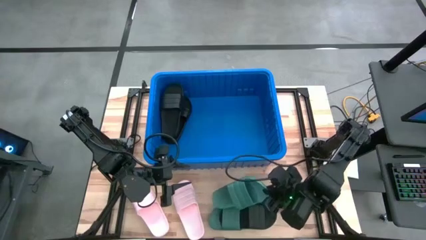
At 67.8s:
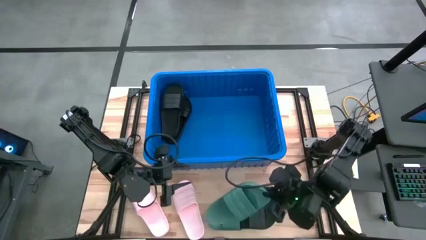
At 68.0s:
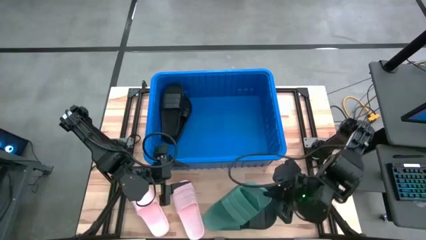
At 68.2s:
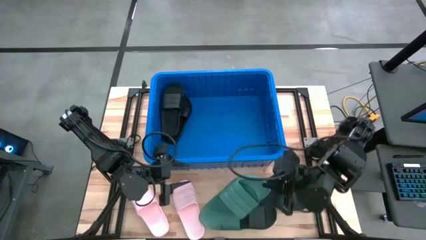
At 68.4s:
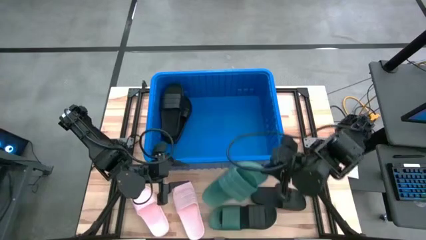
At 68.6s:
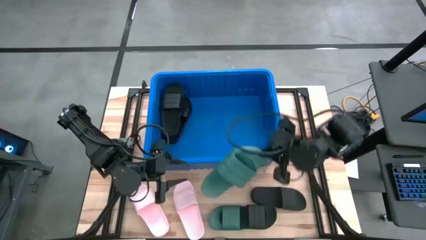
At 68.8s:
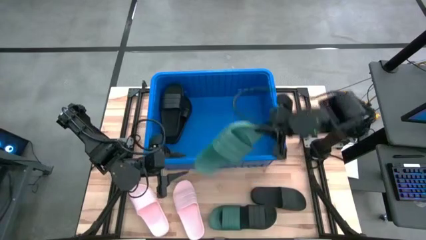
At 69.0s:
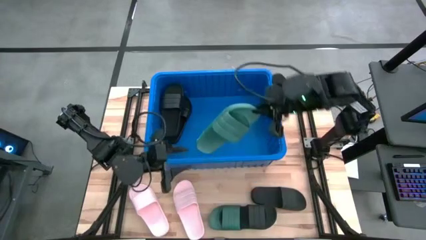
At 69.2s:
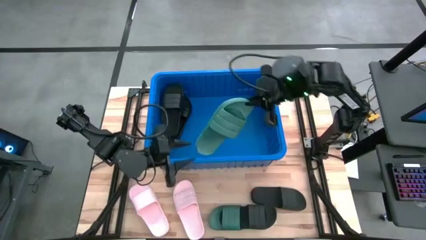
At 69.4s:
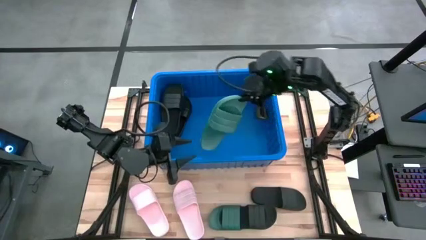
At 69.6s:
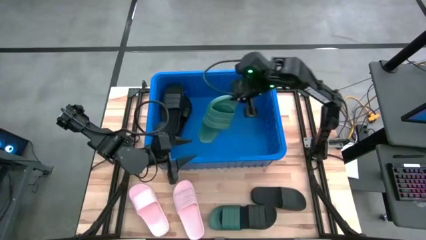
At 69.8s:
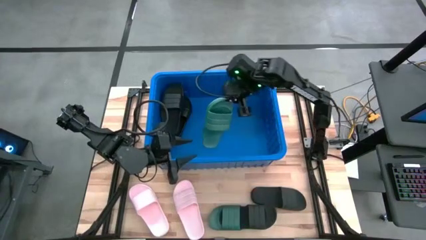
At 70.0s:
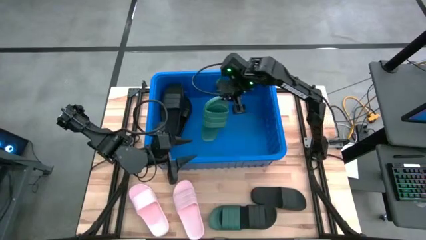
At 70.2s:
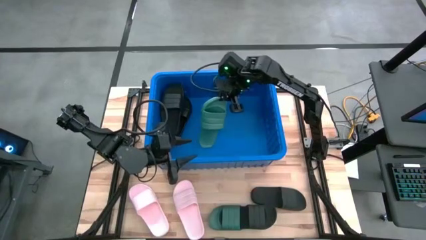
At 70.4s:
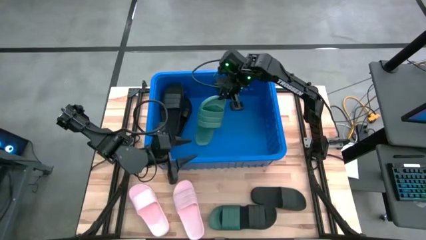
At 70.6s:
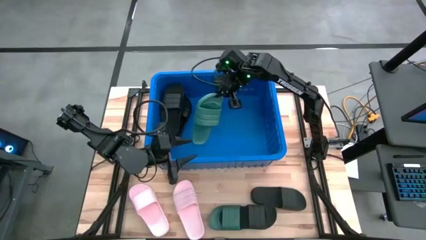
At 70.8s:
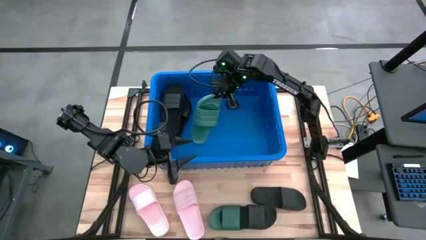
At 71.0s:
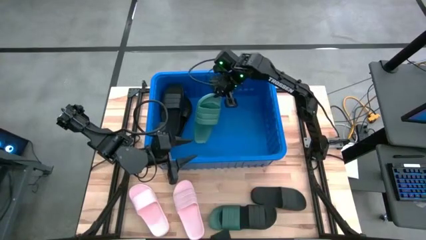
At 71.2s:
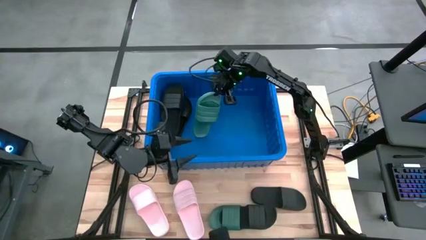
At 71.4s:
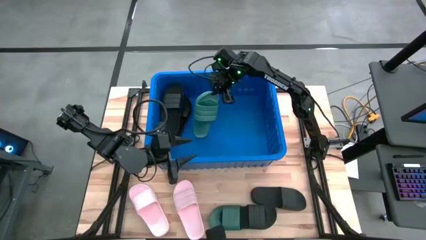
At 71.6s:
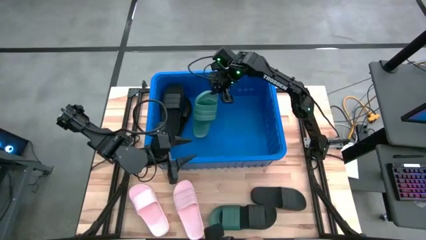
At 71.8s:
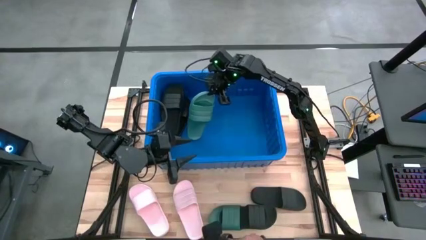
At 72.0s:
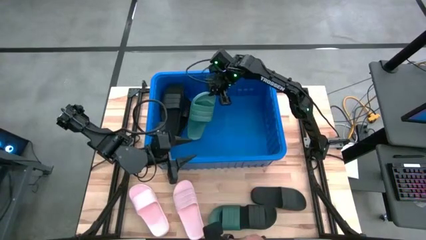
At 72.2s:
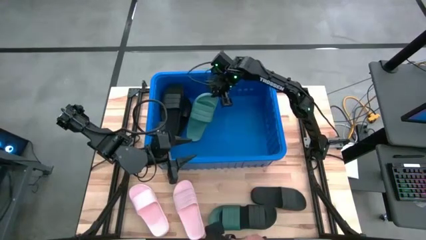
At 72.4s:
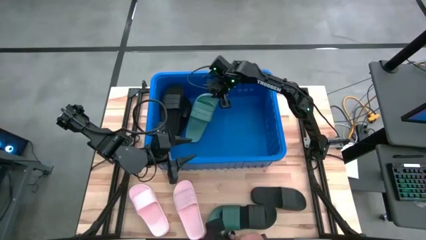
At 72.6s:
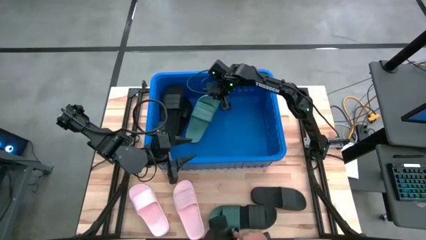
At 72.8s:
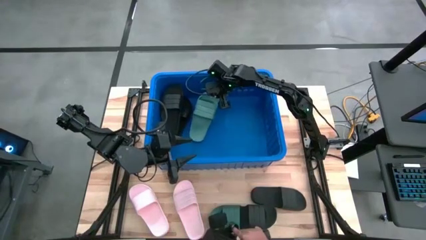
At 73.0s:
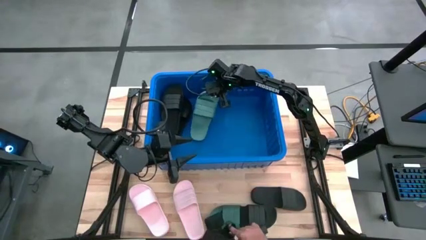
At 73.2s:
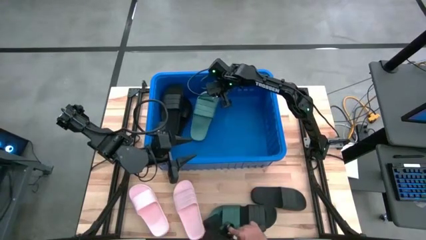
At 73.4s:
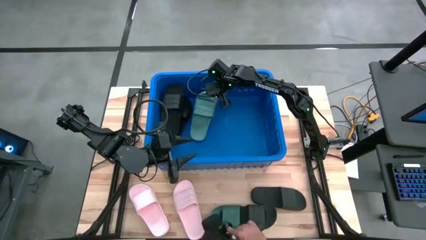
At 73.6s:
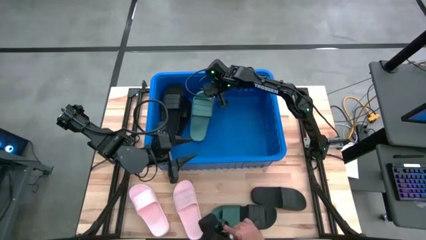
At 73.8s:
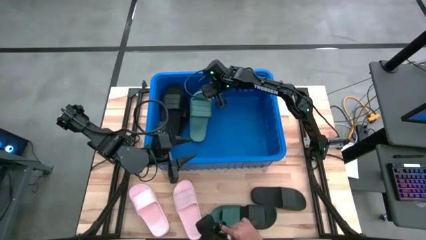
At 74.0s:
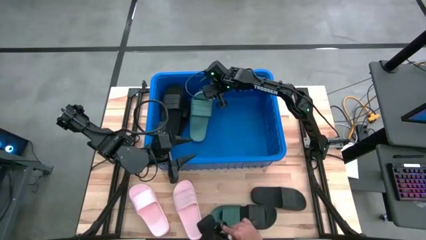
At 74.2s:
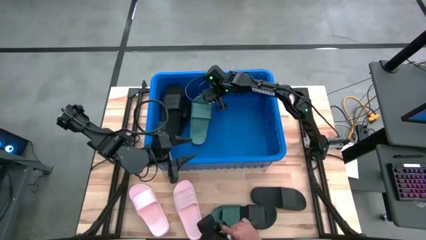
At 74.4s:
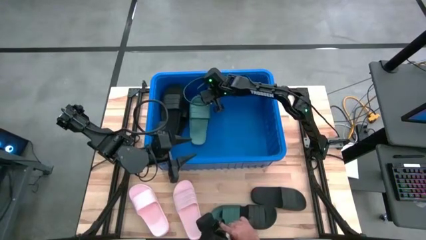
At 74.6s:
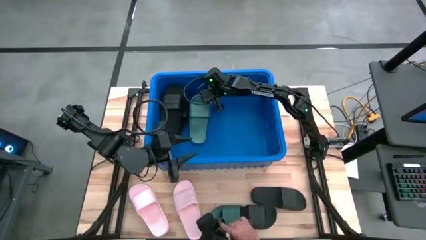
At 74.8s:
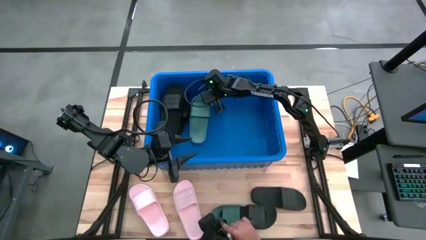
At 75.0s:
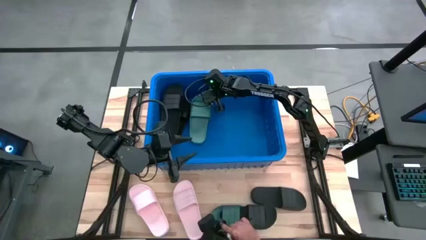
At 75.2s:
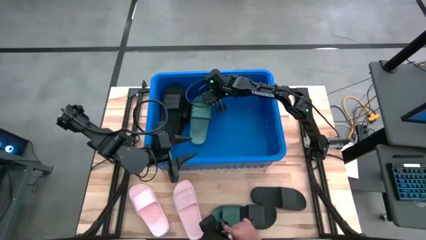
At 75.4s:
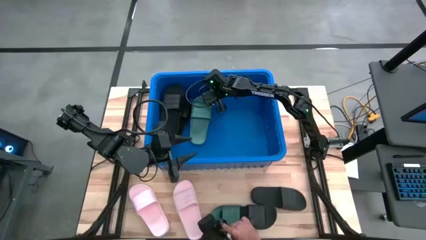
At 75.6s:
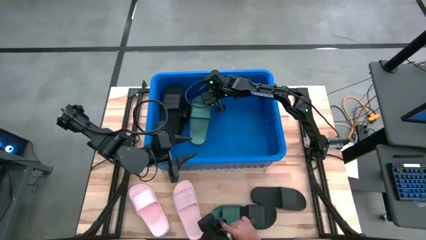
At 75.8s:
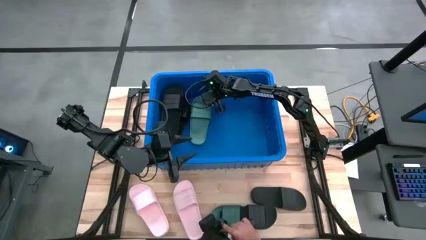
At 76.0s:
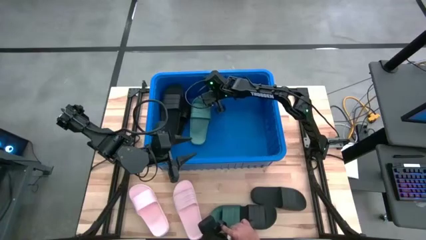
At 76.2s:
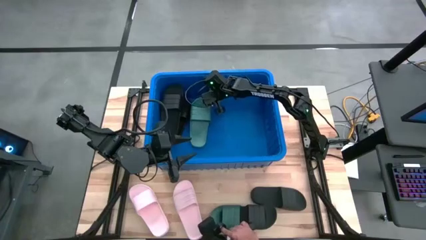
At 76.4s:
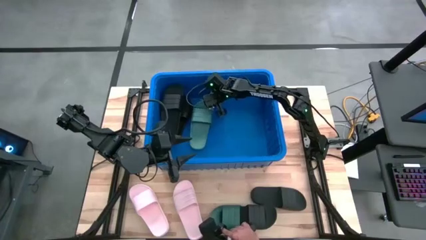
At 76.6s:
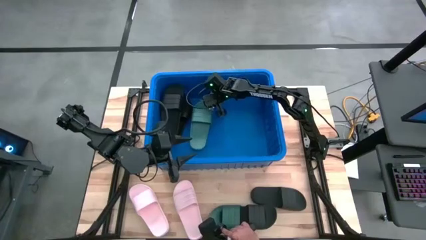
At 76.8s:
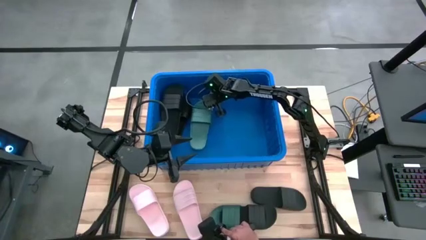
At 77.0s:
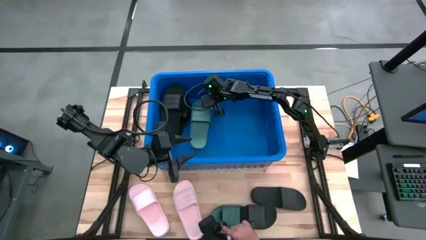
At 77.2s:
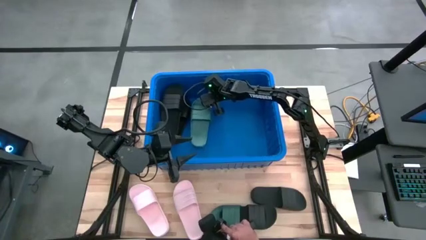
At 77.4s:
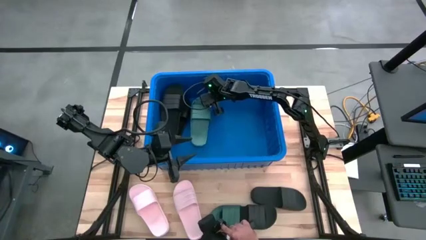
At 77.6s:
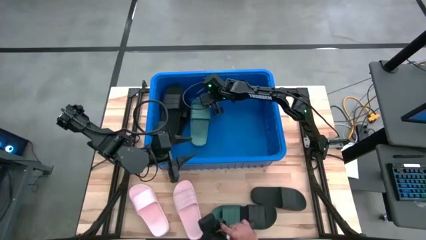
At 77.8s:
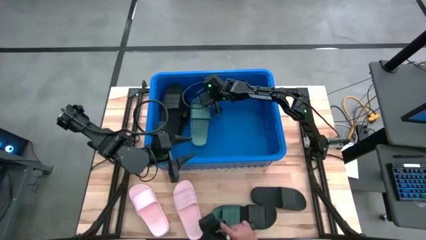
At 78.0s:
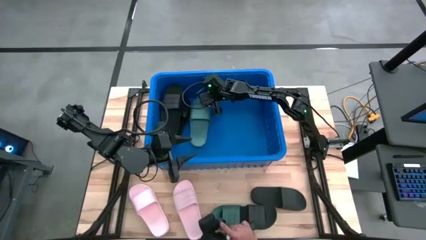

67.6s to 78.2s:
Task: Pick and place slides into bin
Put the green slipper into the blue bin

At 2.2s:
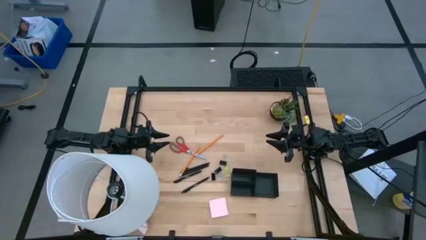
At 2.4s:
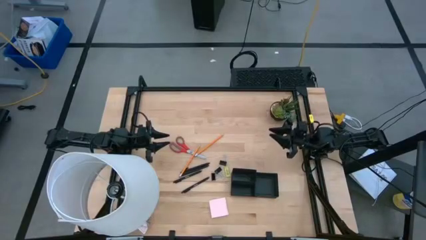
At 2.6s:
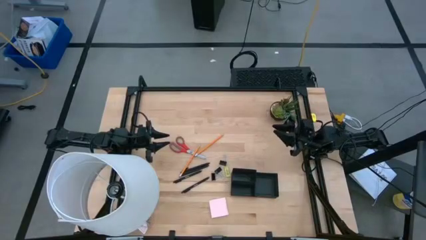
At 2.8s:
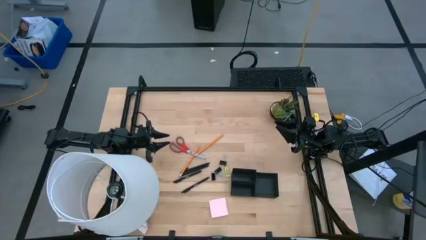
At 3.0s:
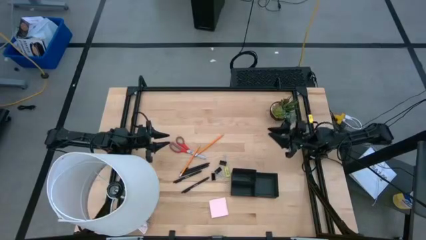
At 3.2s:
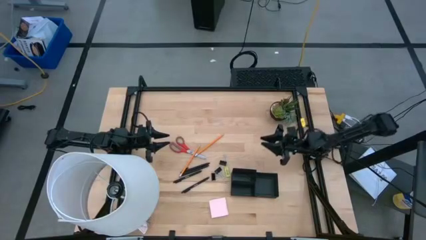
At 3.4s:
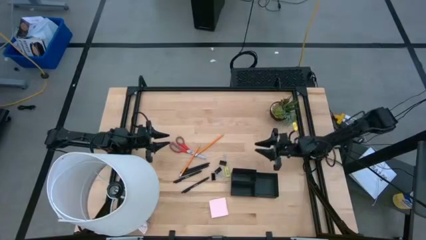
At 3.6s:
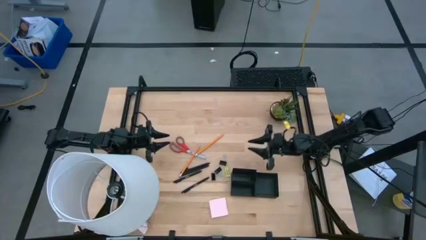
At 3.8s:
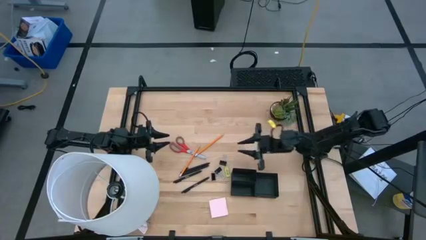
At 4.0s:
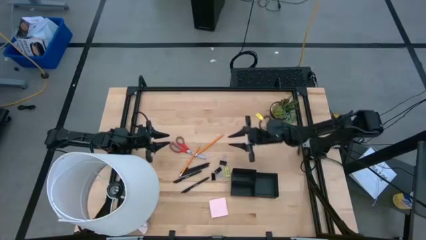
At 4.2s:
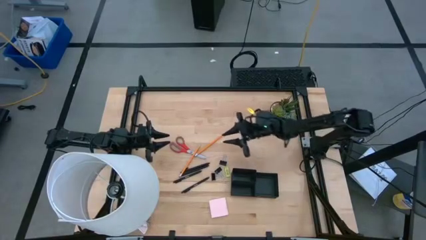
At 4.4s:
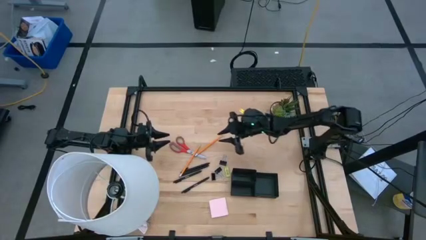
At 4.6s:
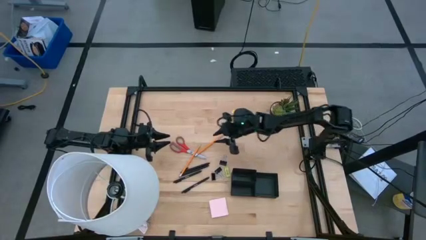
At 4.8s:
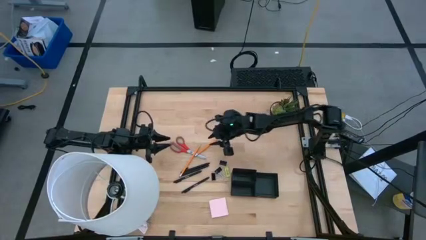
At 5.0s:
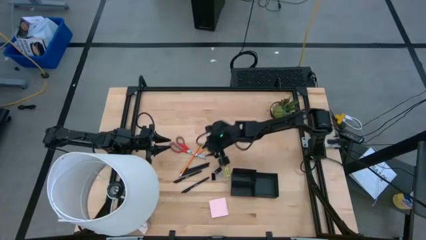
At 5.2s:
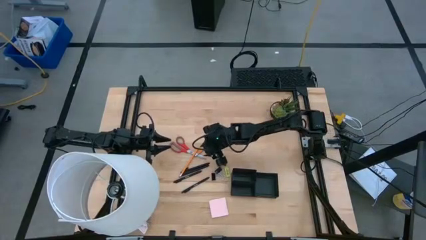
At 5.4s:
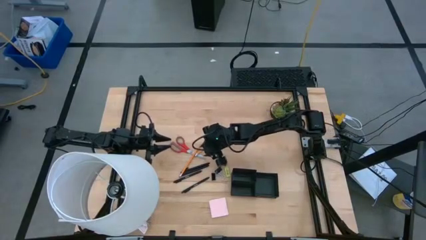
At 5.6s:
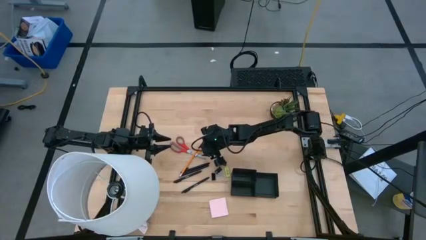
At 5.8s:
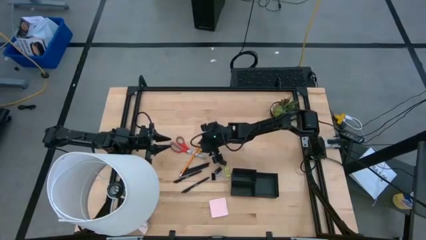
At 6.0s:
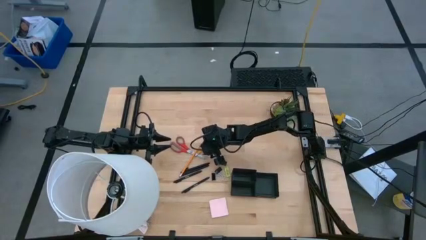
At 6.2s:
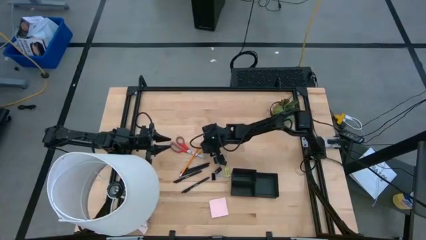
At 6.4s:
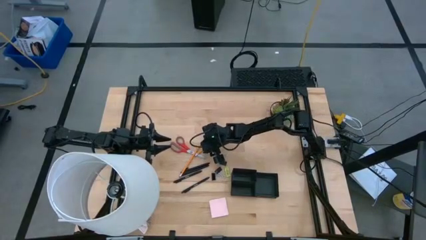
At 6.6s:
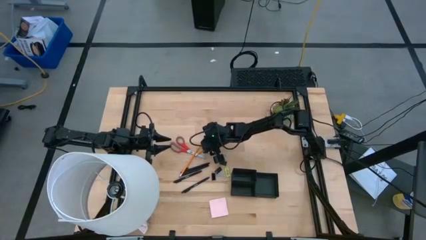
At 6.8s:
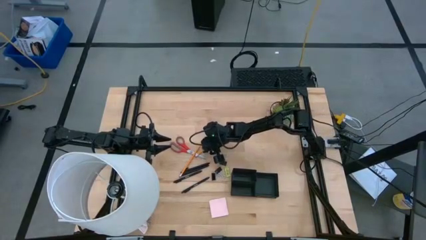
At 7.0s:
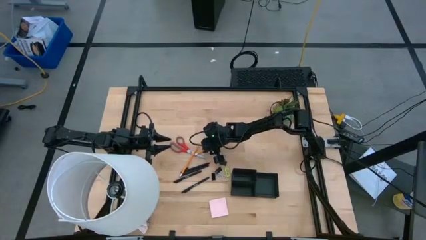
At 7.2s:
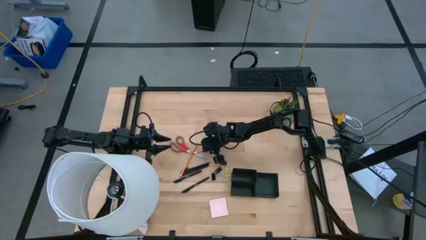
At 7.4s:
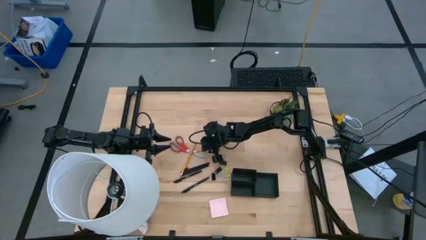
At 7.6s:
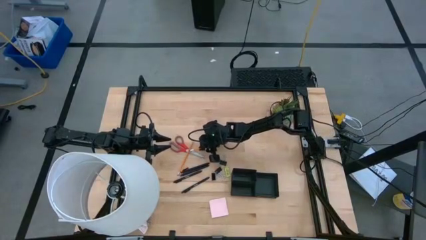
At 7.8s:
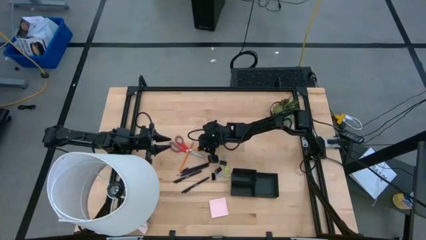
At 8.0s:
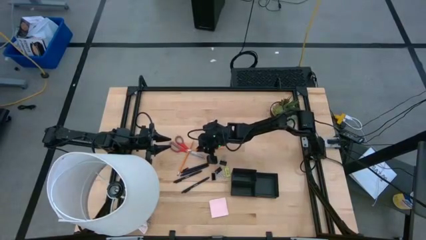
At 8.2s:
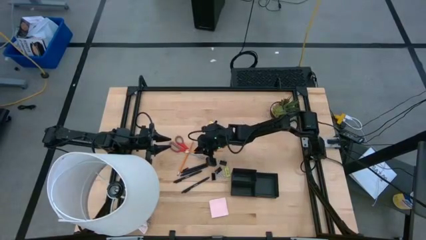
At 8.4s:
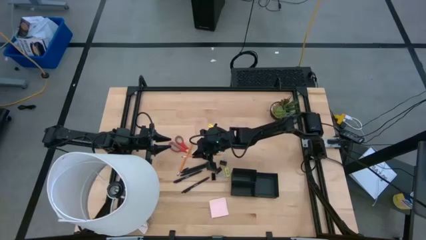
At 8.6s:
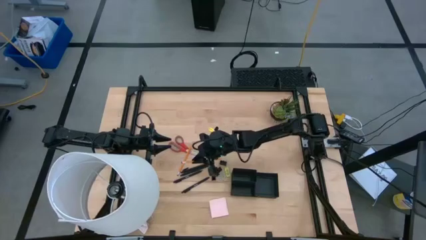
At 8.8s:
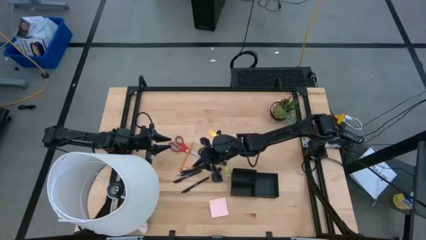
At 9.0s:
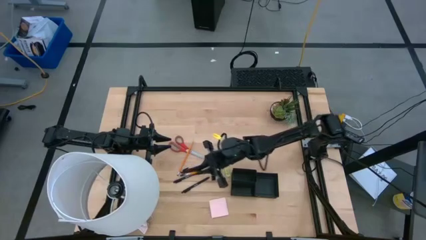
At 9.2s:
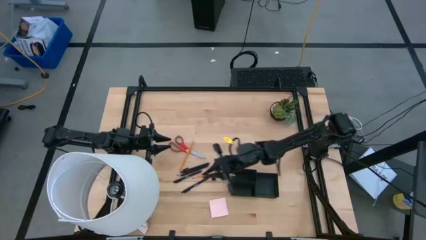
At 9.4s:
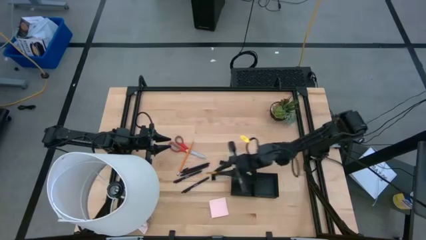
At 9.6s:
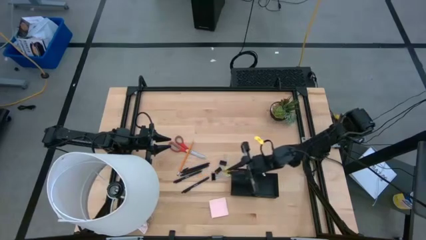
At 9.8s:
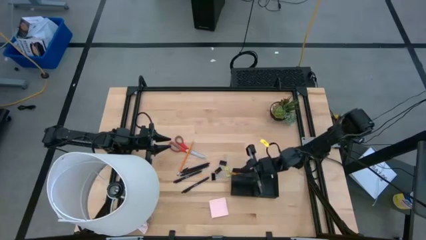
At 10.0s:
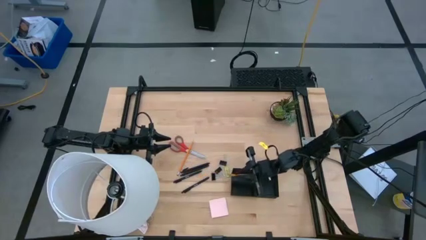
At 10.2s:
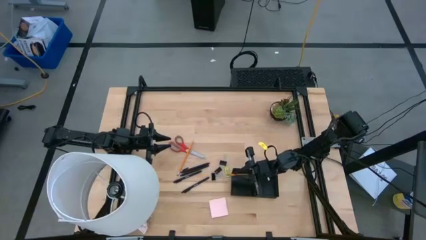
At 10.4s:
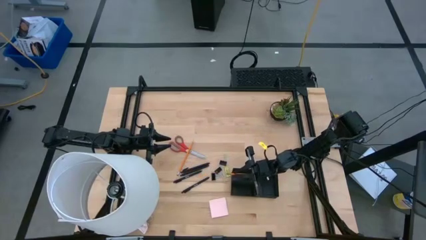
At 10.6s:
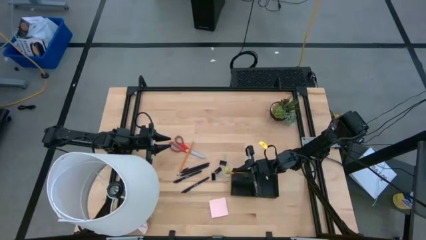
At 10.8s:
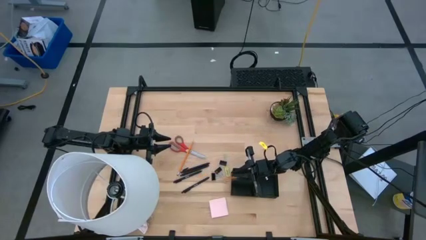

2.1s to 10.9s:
Task: Pick and place office supplies into organizer
Put the yellow pencil into the black desk organizer
